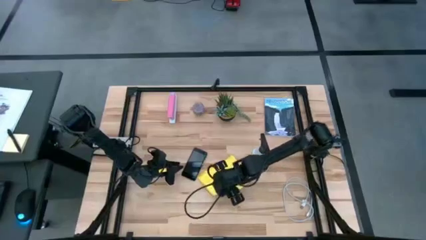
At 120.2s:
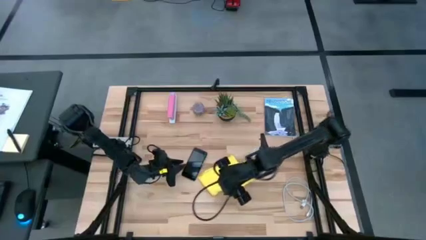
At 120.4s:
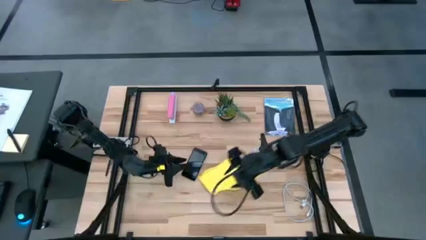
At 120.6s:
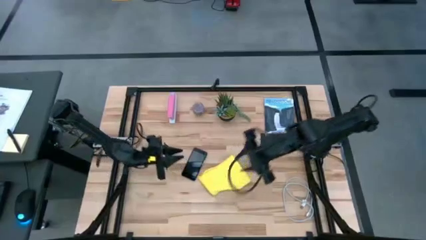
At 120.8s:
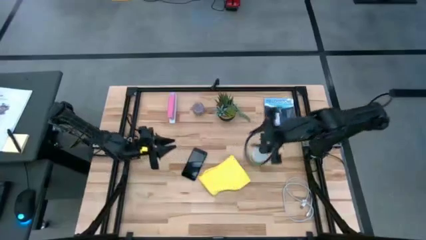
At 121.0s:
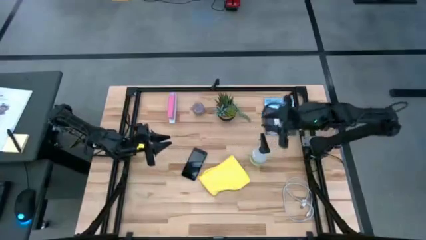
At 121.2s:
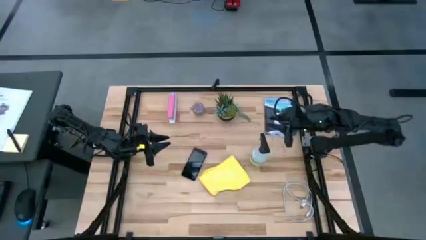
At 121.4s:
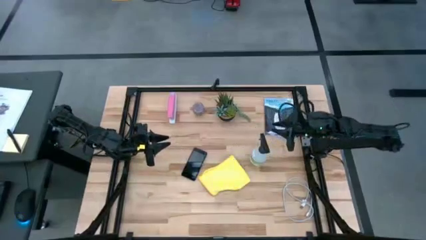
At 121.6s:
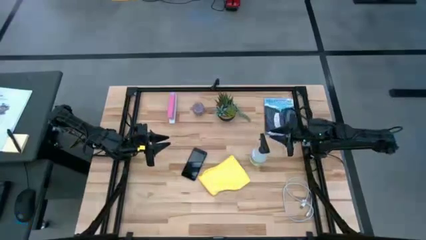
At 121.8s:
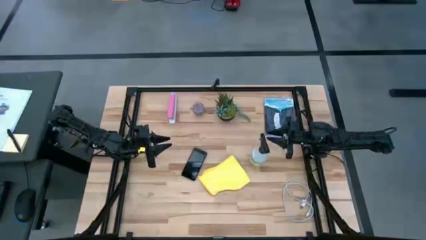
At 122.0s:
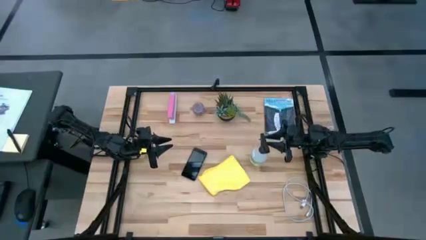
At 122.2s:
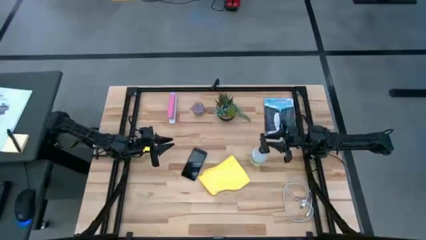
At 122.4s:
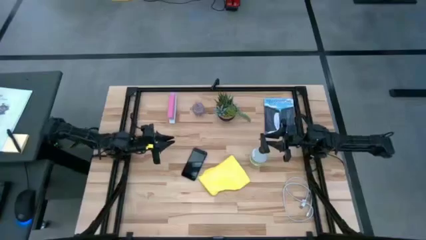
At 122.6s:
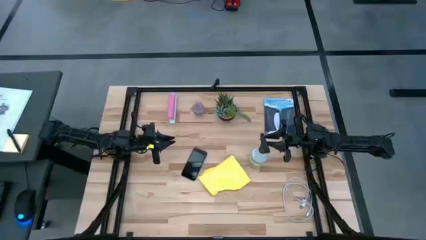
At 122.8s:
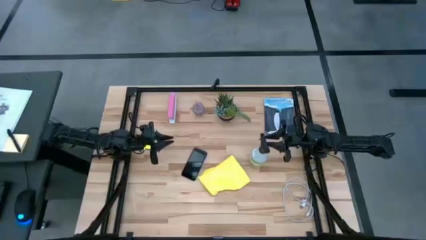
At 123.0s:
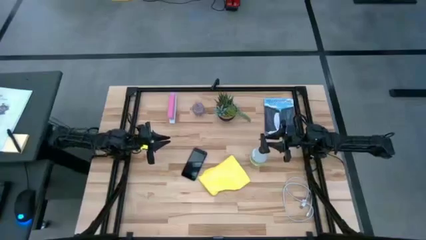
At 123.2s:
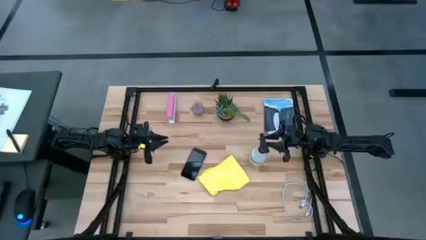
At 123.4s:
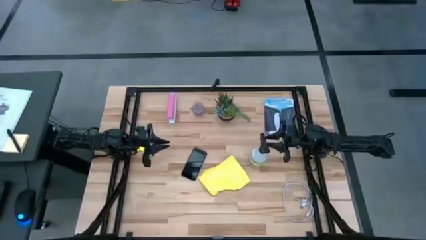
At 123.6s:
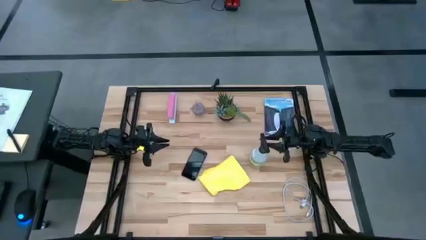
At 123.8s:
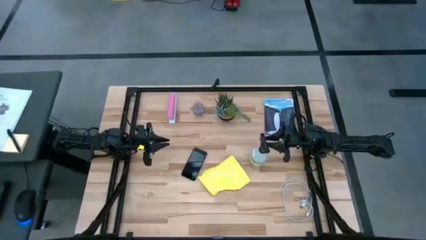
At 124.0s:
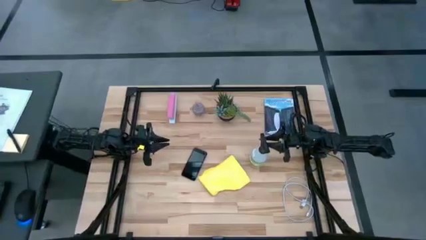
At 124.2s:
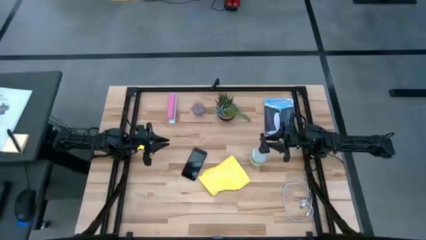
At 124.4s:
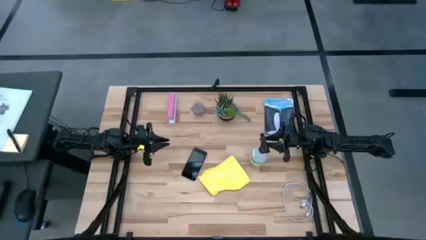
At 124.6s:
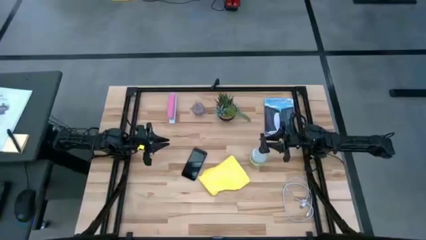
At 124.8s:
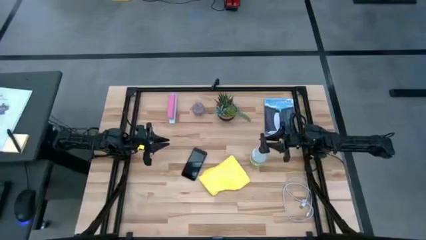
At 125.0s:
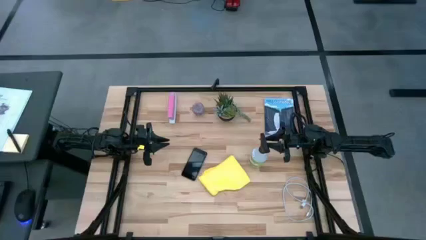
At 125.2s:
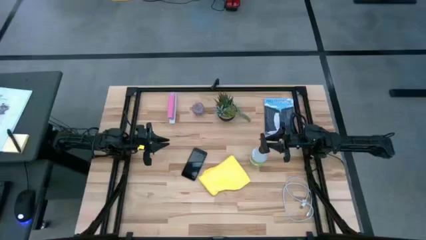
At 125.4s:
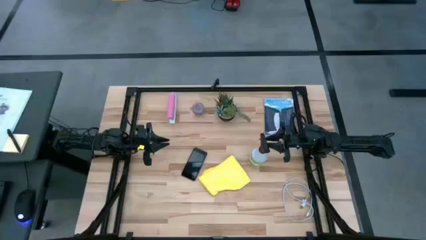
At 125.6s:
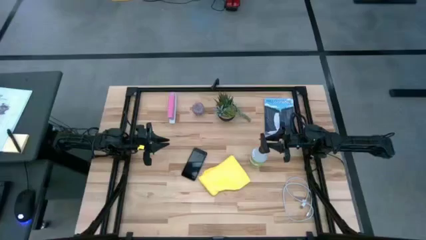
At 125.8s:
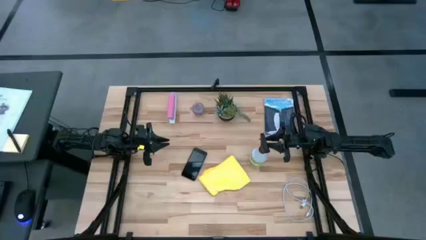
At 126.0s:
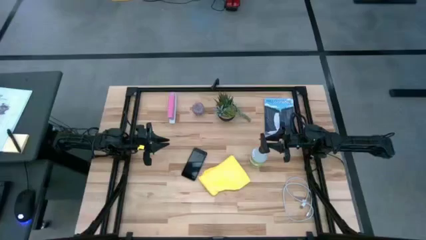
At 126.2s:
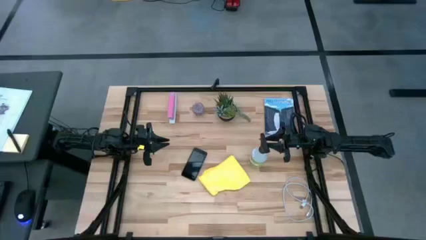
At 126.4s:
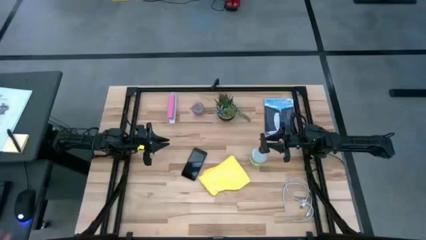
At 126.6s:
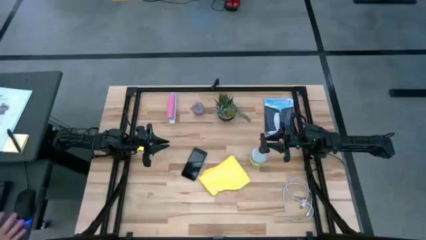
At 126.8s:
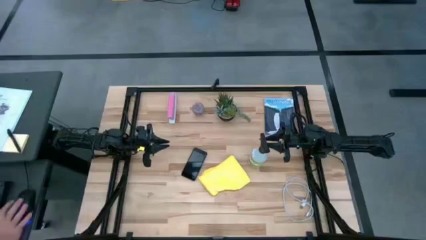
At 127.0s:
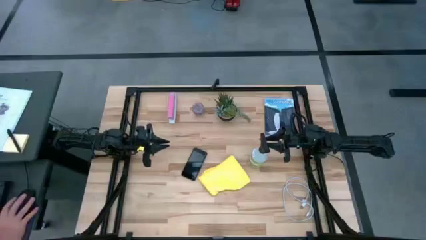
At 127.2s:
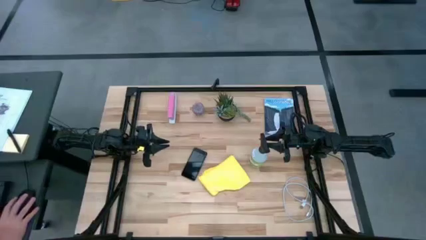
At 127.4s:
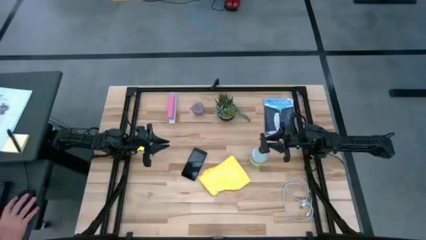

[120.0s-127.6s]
Task: Apply microfiber cloth
Return to Home Position

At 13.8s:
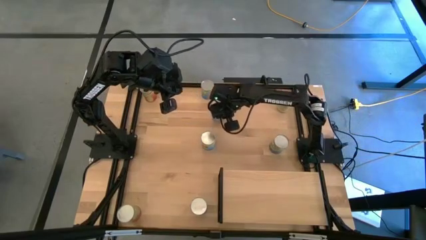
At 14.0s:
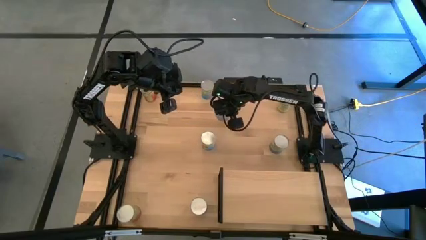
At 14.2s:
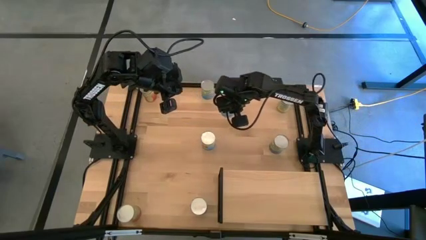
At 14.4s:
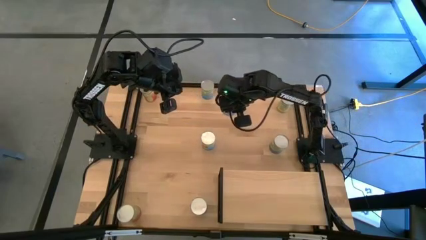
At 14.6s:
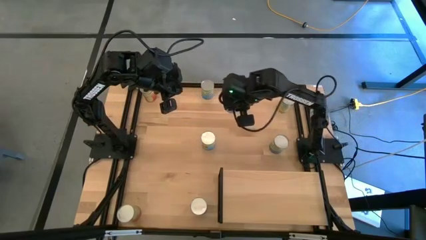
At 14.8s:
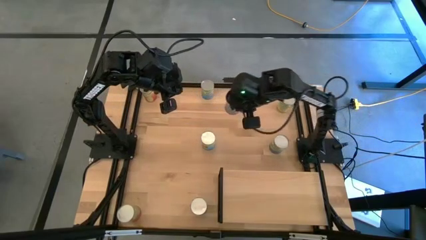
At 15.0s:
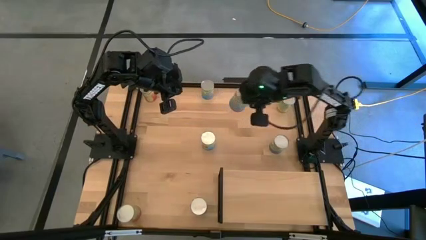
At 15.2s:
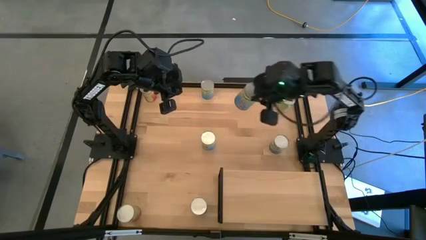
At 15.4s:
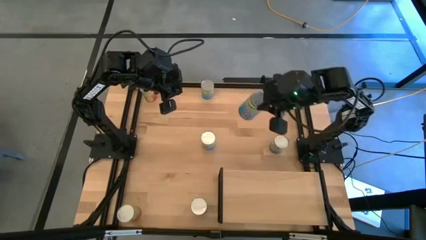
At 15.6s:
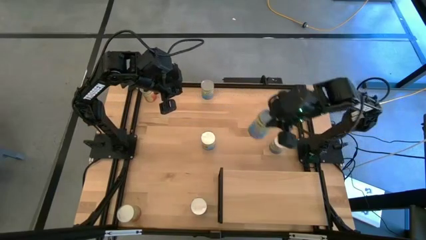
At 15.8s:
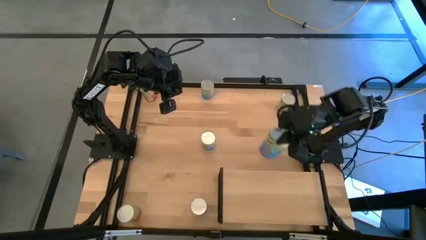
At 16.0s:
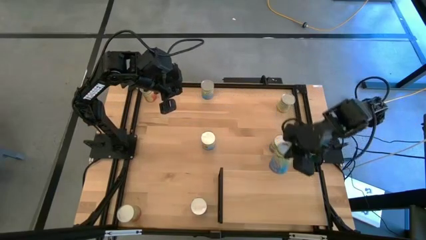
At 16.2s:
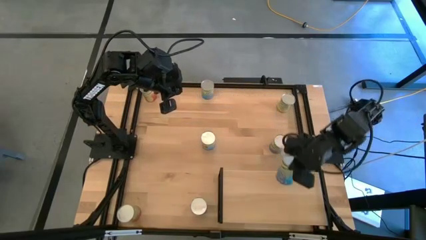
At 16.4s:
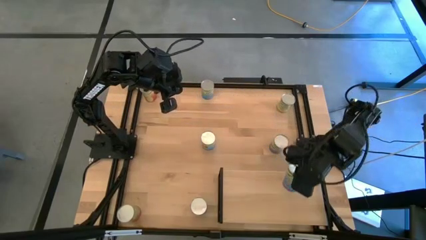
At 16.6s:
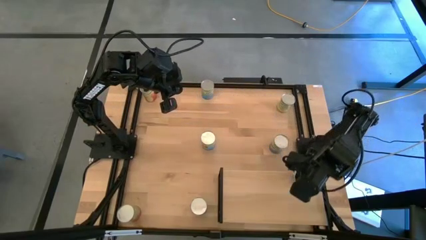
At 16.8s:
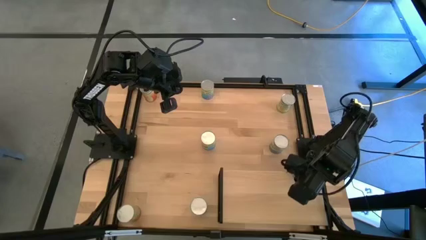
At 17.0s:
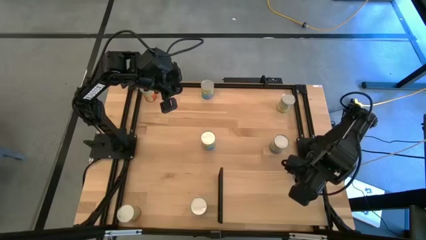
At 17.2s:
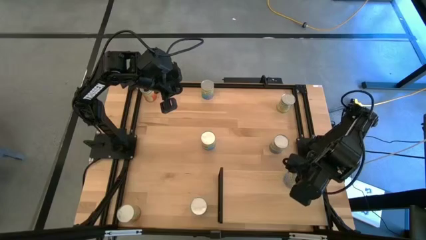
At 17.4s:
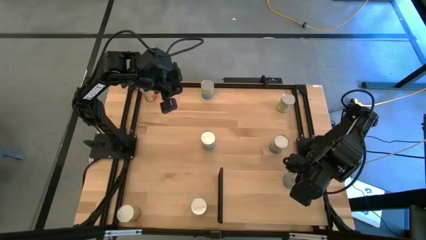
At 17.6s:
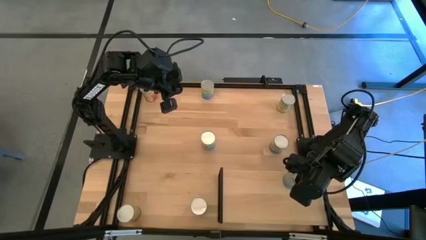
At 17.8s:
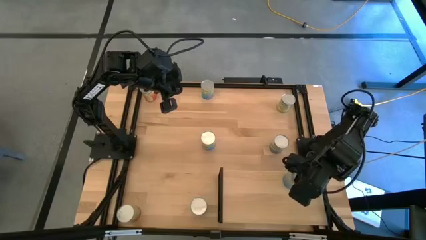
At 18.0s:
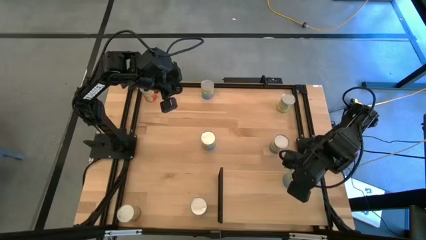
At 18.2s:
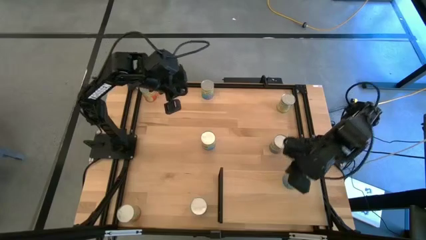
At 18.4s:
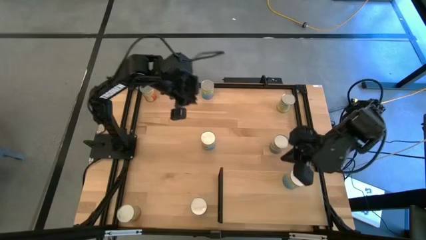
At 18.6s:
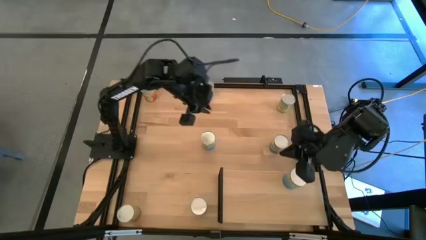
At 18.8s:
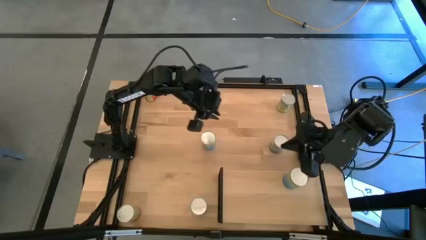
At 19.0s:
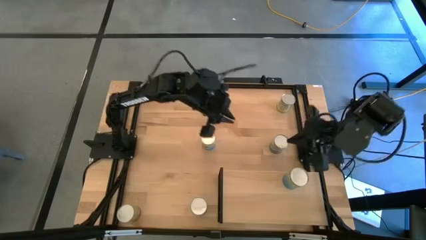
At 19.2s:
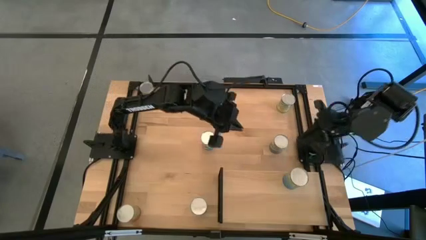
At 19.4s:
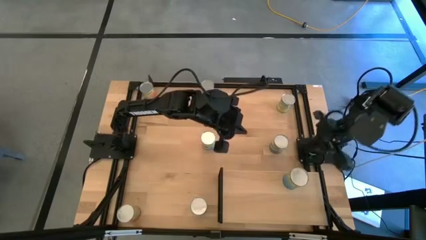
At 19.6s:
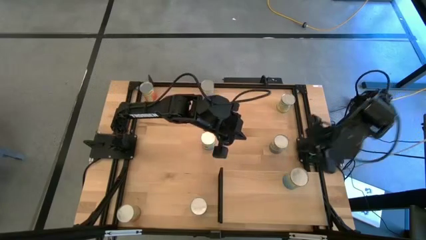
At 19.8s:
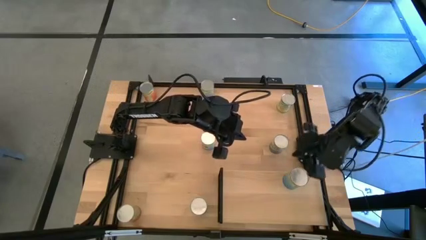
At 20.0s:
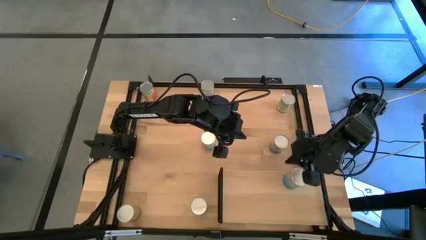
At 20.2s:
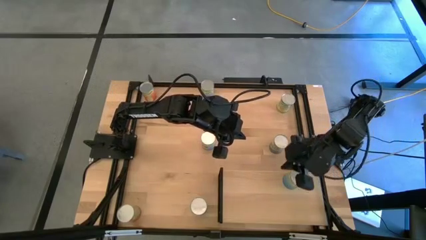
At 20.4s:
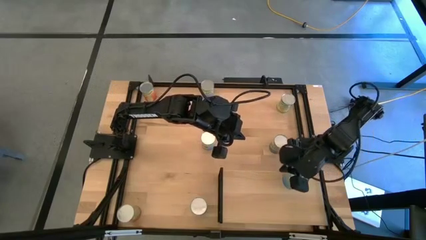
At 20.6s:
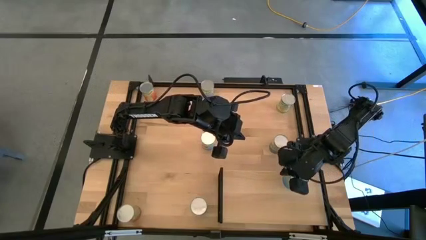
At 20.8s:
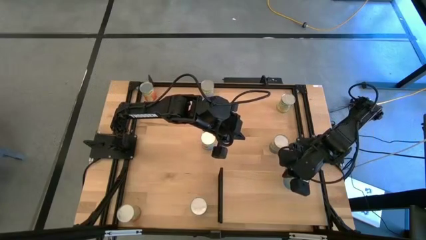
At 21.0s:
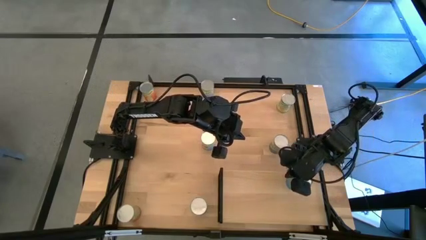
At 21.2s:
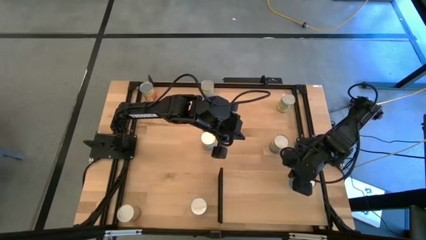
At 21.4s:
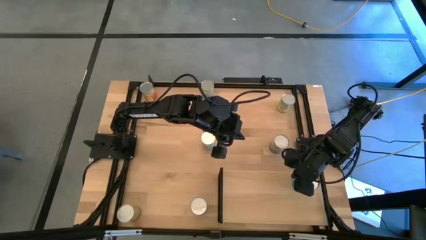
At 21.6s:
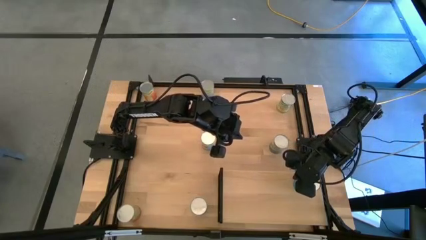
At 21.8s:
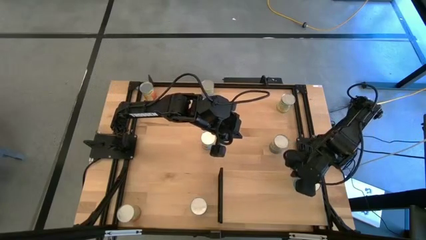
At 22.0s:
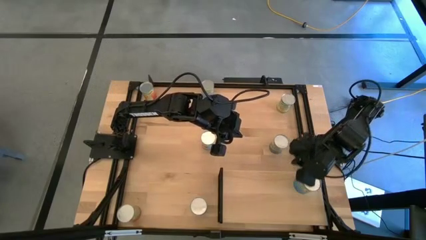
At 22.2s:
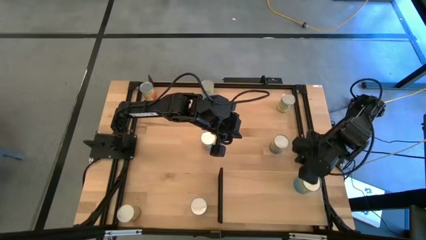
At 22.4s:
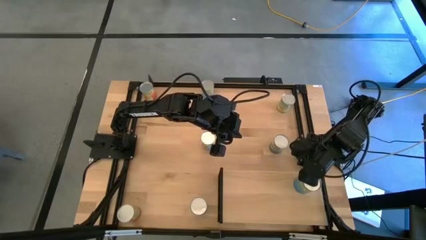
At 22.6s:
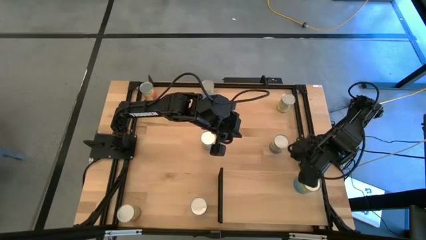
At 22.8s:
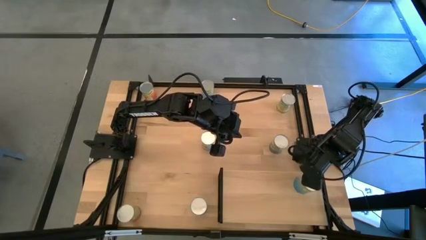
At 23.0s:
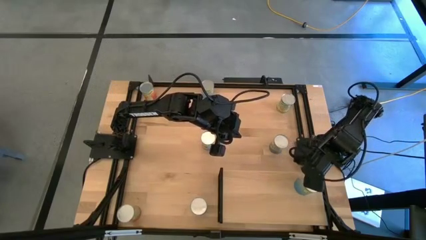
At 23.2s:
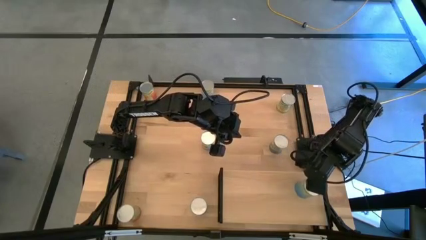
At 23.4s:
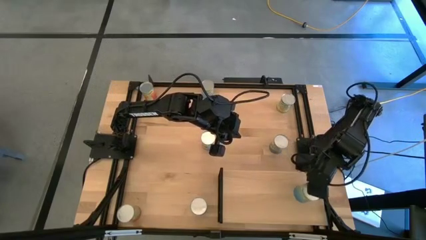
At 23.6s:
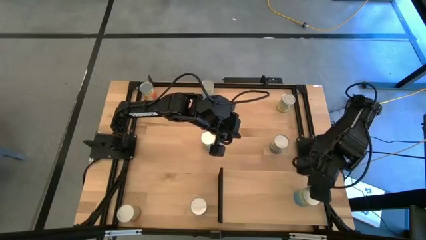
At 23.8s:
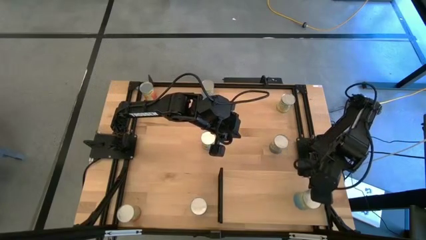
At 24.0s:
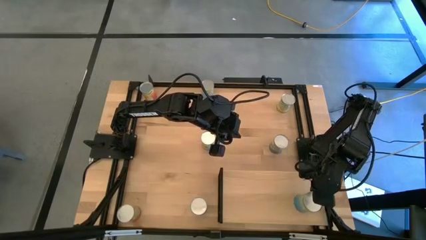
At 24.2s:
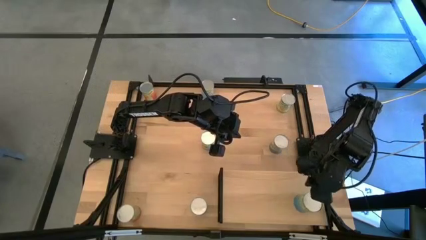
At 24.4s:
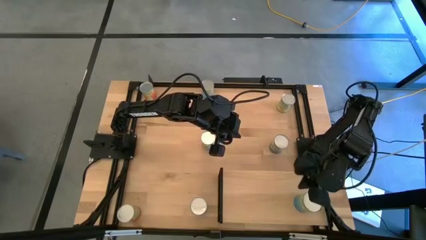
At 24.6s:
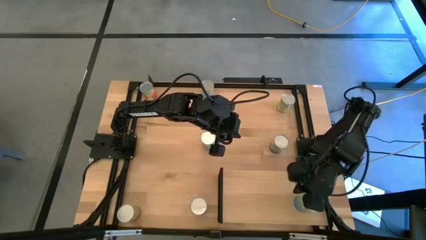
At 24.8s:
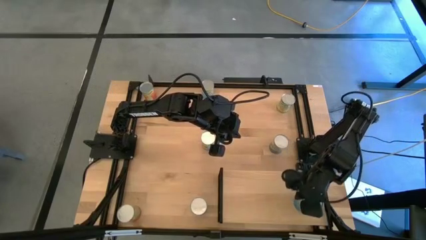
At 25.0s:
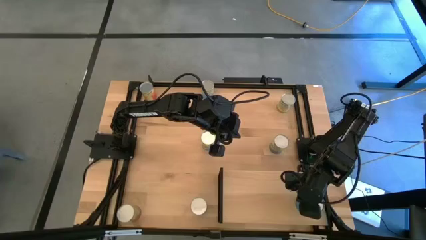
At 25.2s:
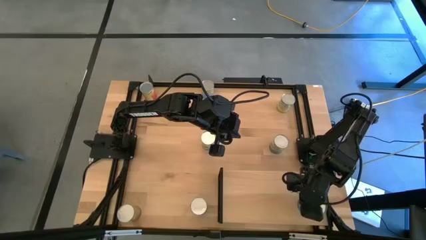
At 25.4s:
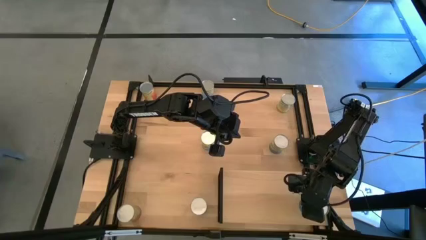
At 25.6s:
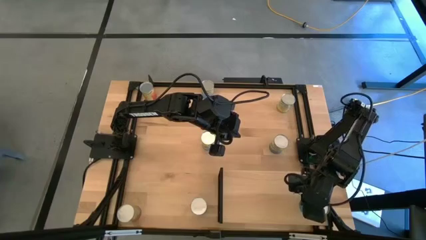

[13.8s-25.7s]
Task: Pick and place cans onto a shelf
Put the bottom canned cherries can on the shelf
